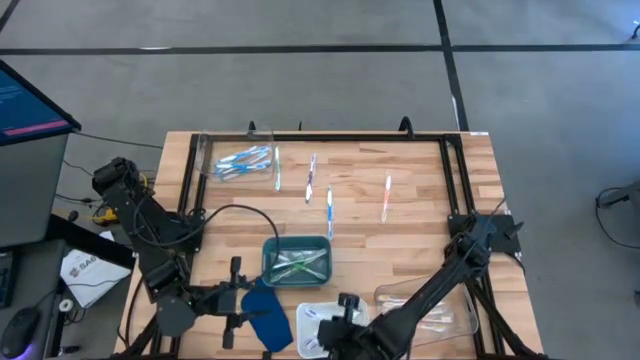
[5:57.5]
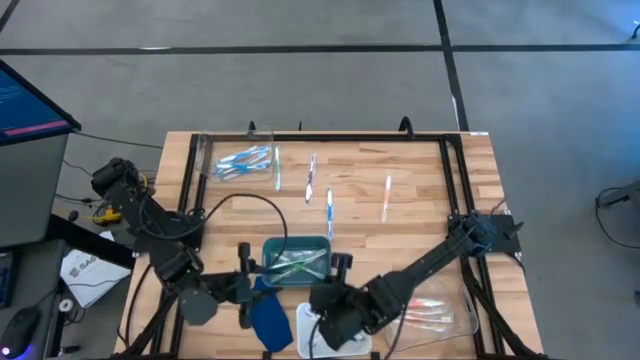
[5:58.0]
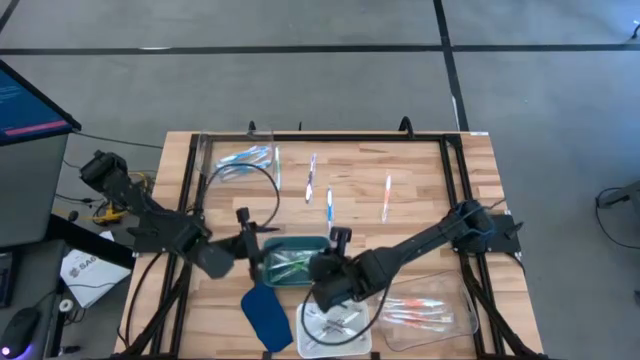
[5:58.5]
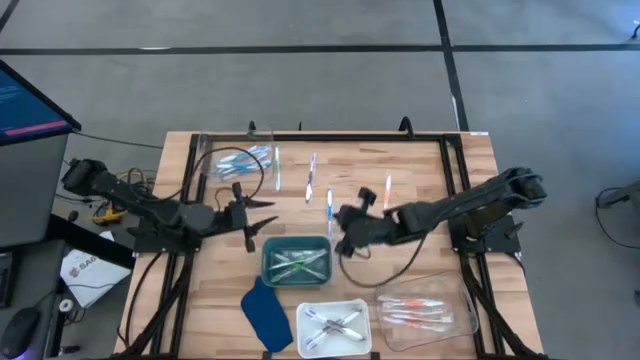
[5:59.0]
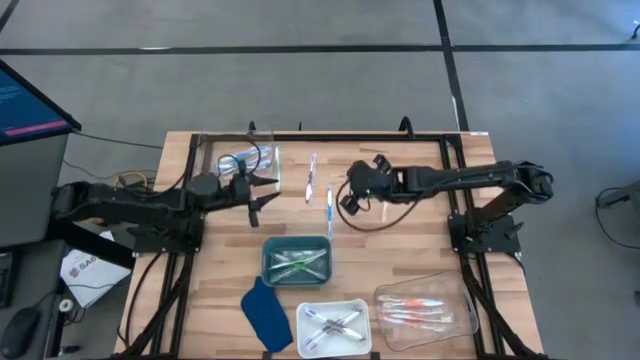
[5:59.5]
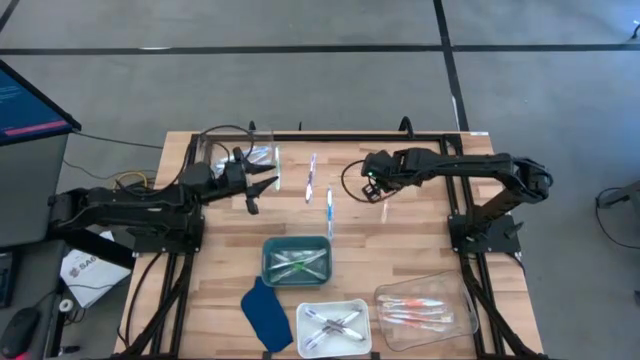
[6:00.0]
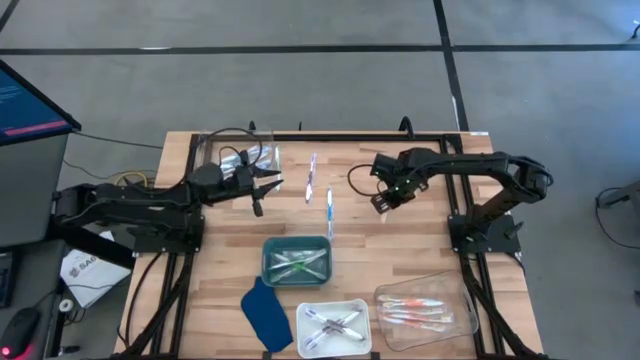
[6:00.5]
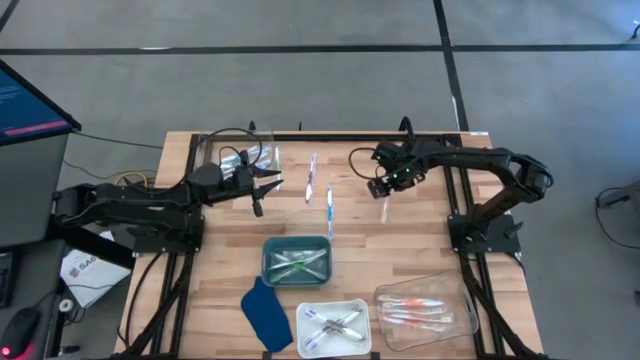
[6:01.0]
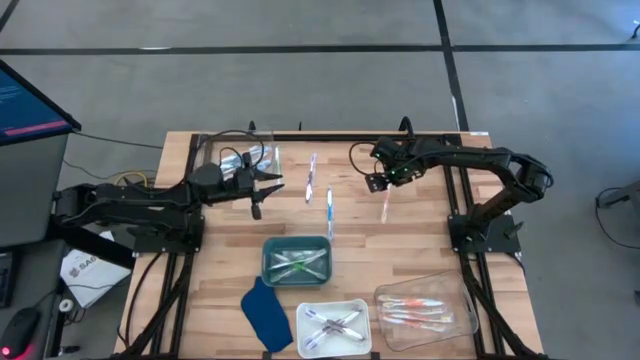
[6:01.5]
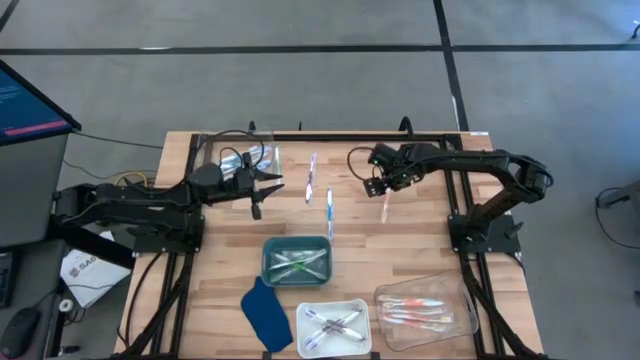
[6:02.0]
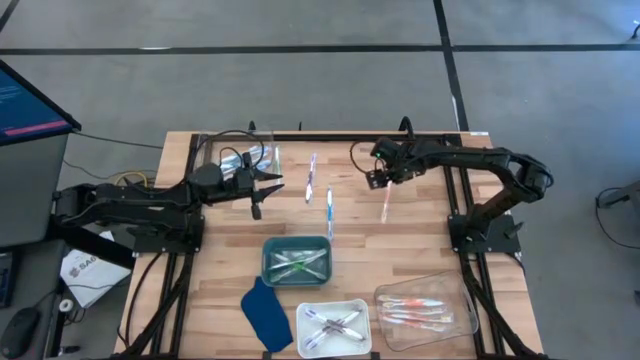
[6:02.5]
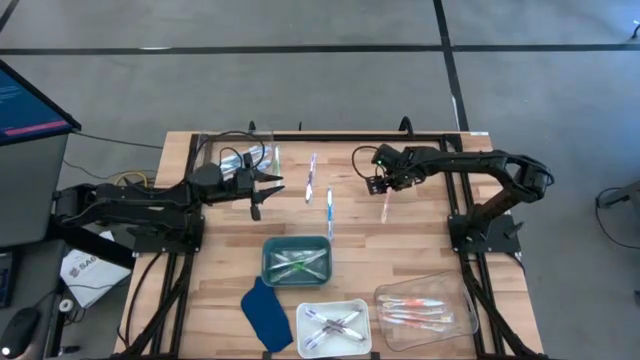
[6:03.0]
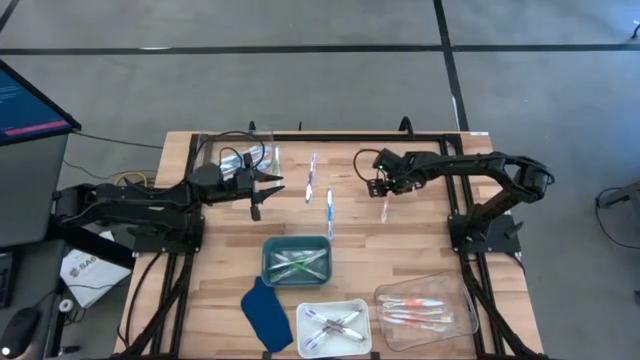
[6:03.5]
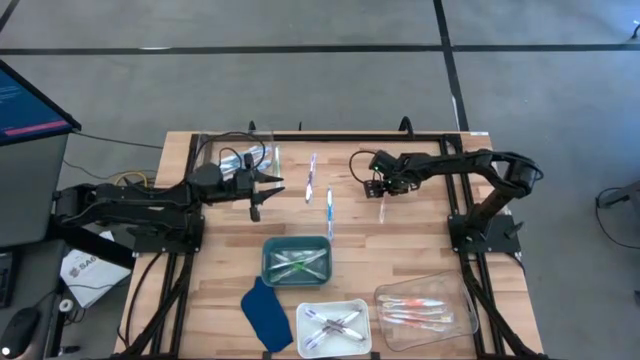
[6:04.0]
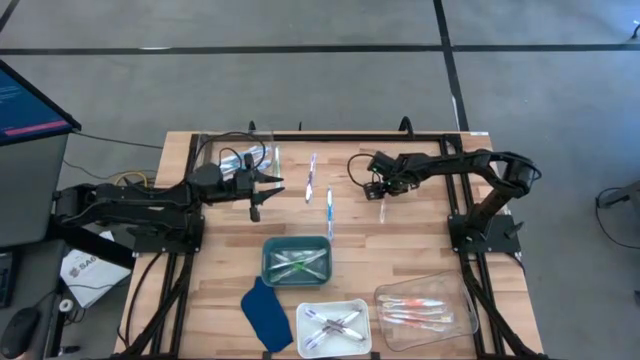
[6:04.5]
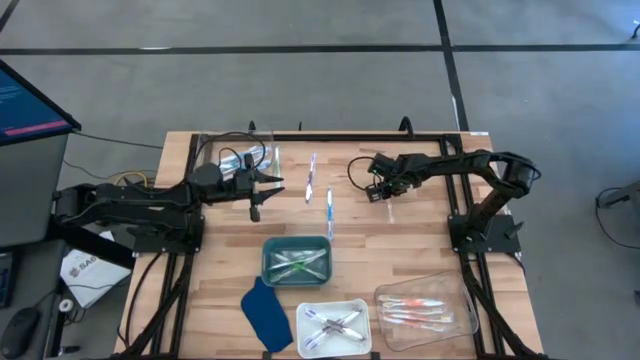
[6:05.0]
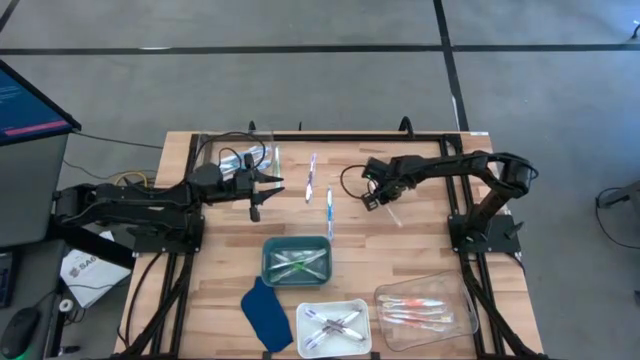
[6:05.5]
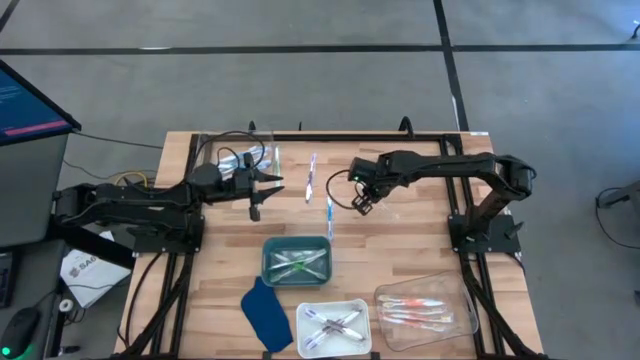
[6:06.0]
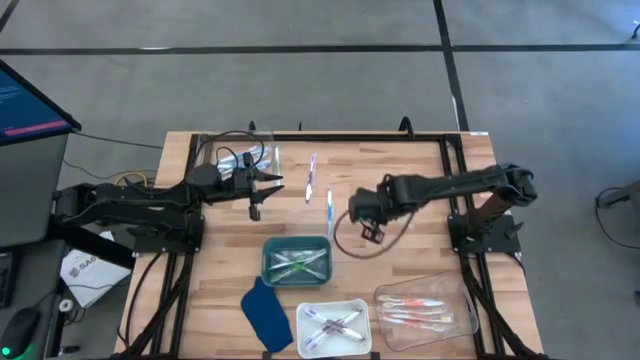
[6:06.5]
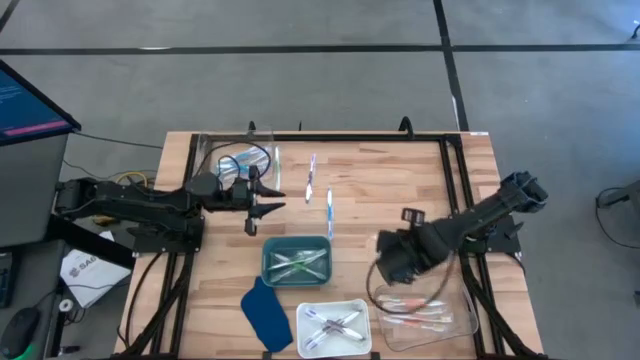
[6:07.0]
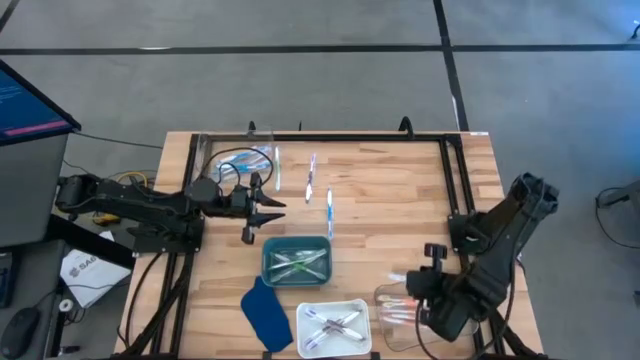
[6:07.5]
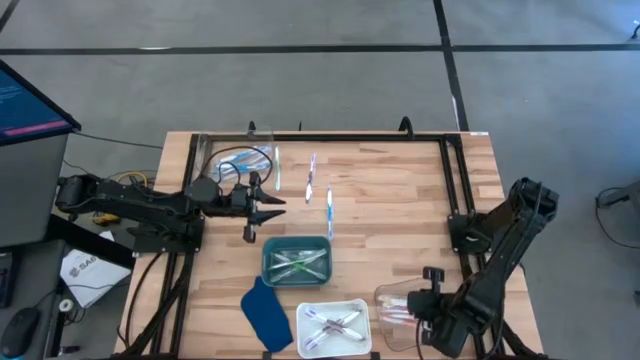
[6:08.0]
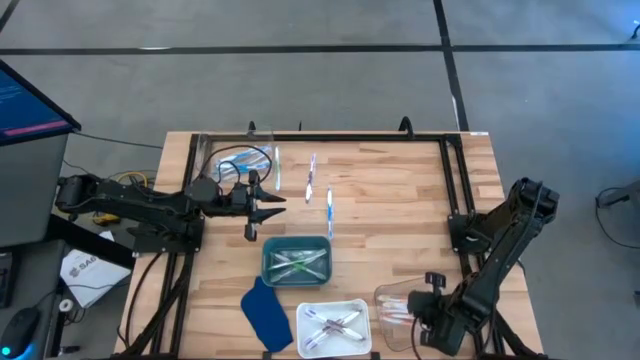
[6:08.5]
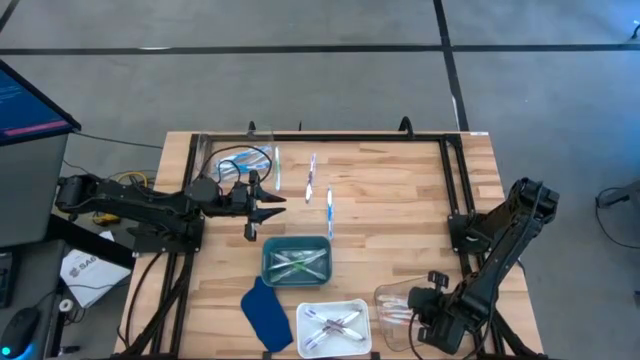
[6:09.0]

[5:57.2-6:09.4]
Task: Pick & Place Toothbrushes
Put the orange toothbrush into the bottom transparent bin

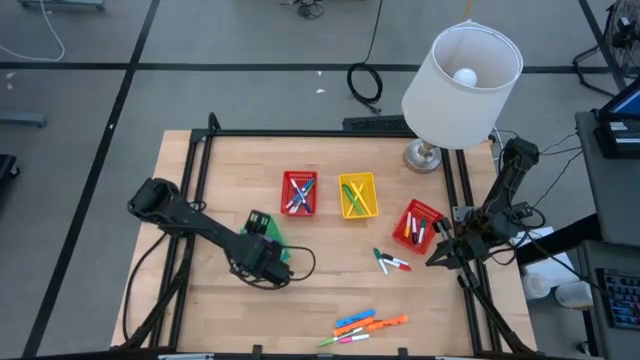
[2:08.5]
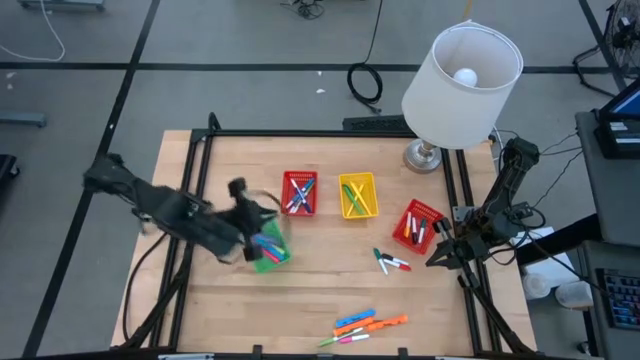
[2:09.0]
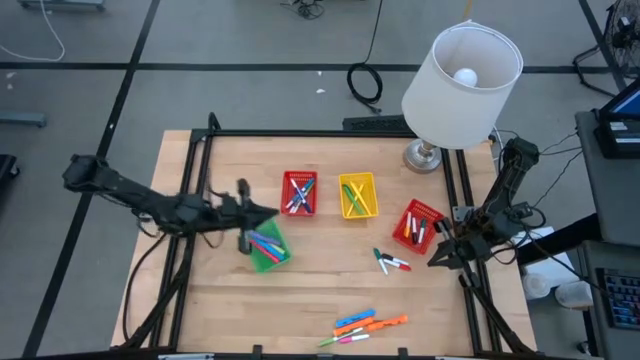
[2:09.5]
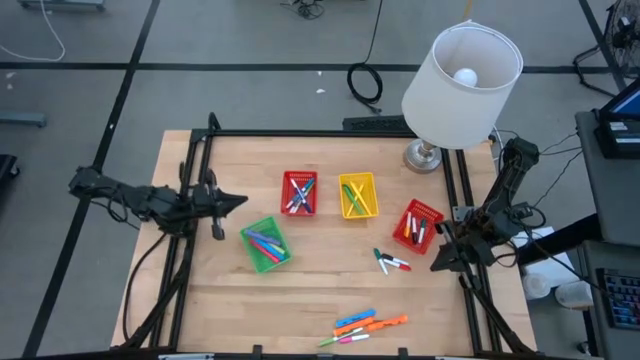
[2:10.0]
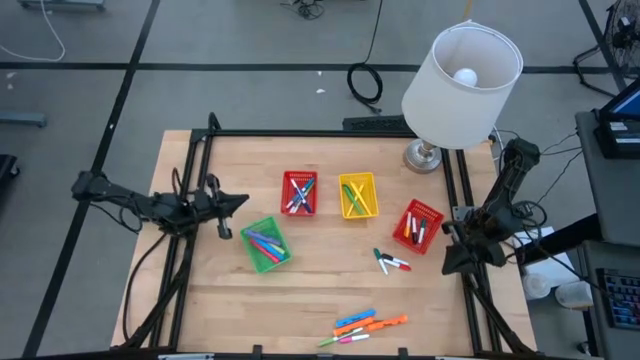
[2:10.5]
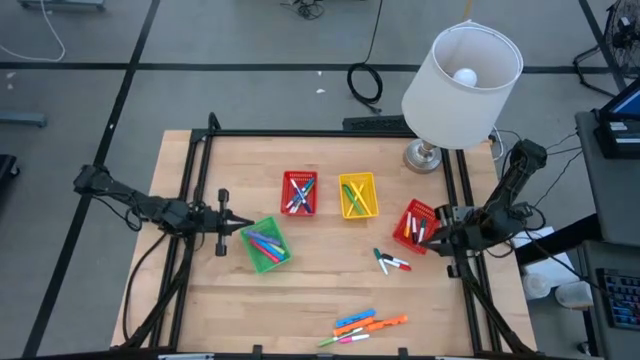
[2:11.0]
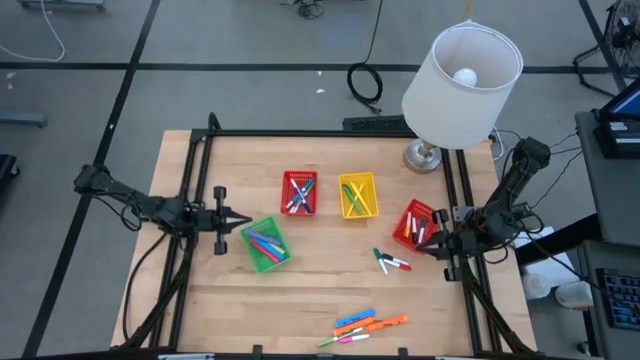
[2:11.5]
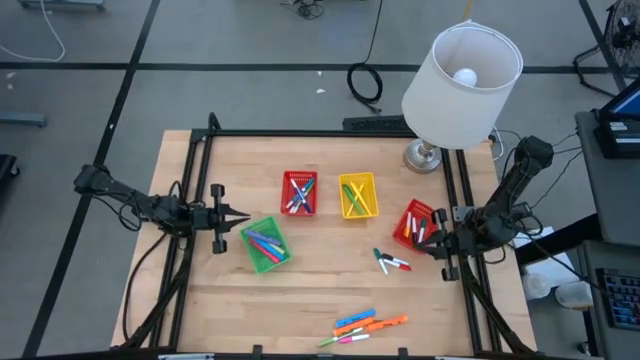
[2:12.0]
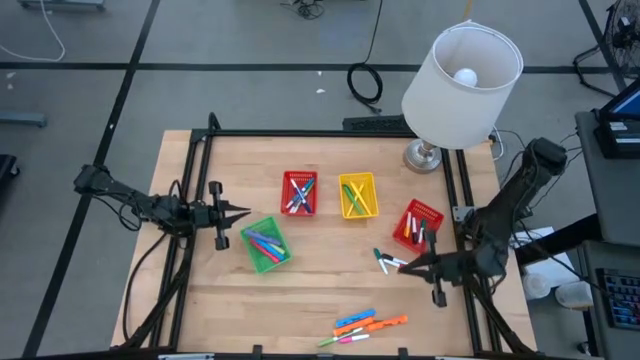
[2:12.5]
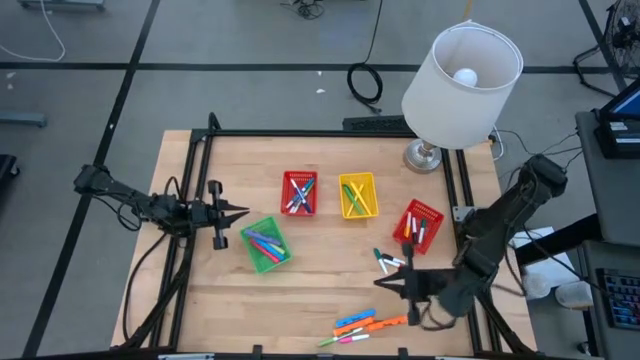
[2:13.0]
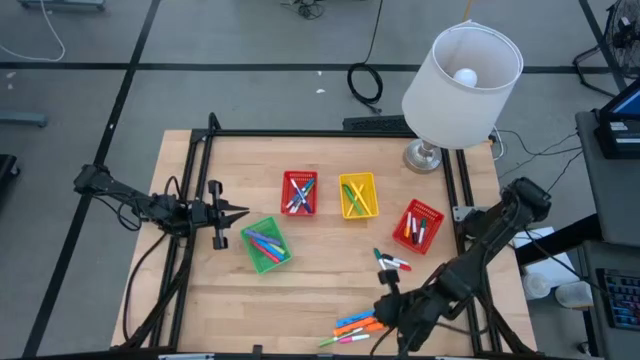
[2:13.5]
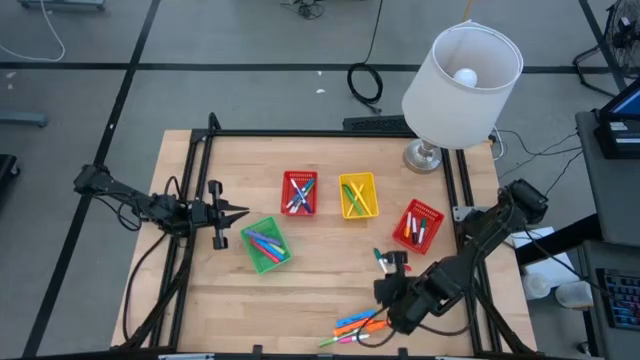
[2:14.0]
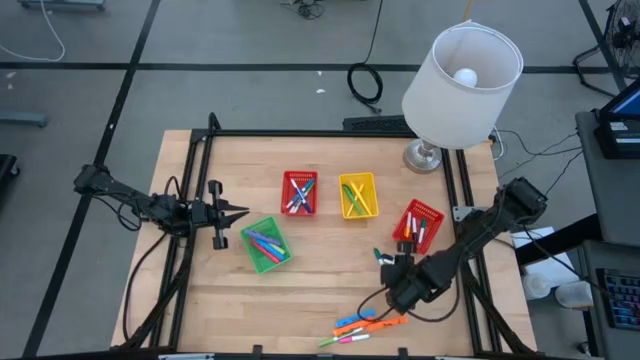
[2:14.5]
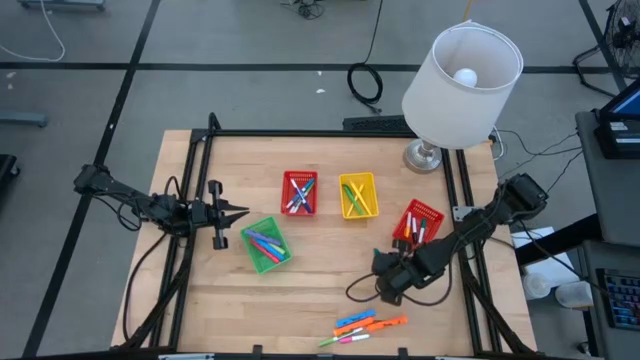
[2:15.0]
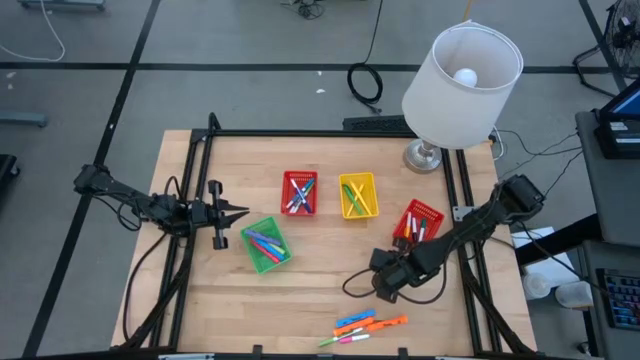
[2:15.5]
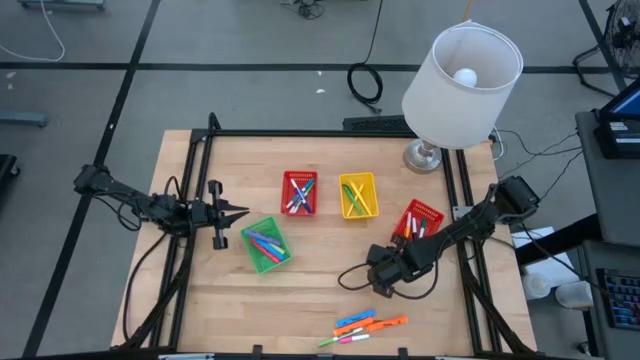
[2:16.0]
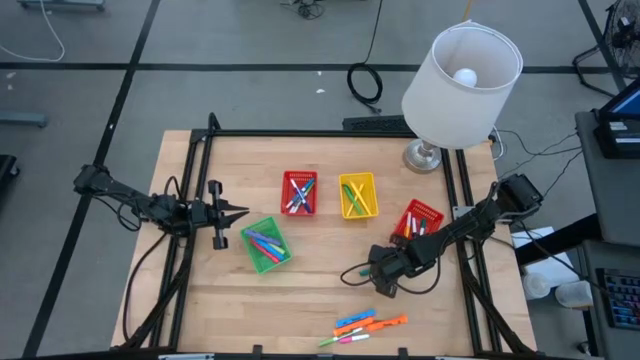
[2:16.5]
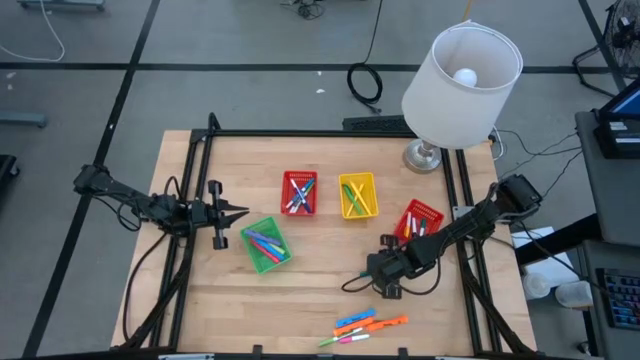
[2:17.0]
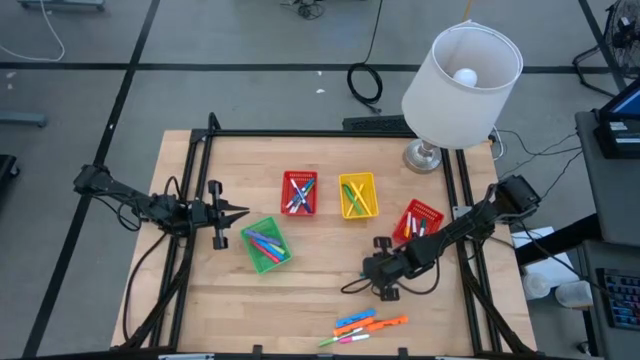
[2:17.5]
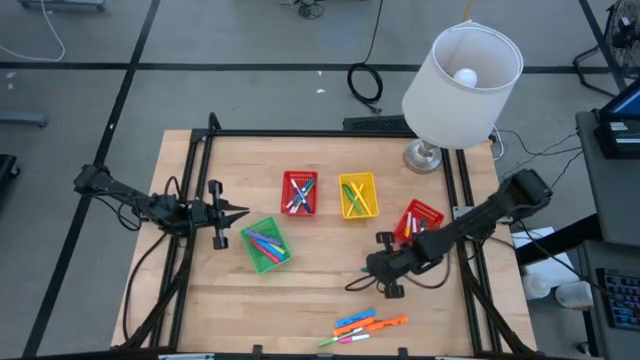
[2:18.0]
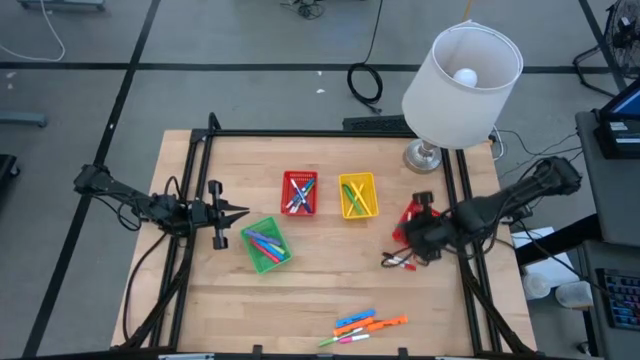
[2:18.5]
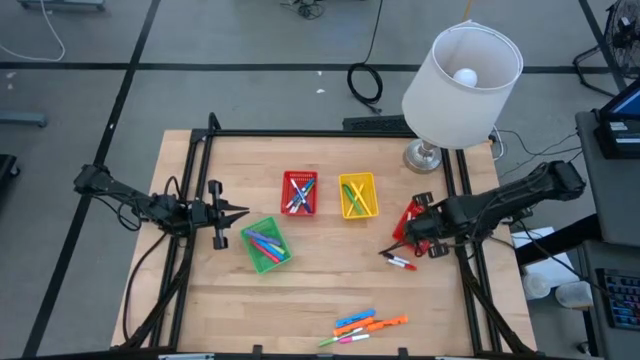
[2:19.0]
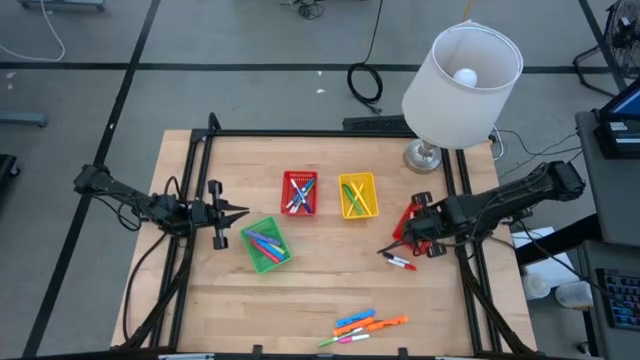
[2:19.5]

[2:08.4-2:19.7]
Task: Pick & Place Markers
Put the green highlighter into the right red bin
